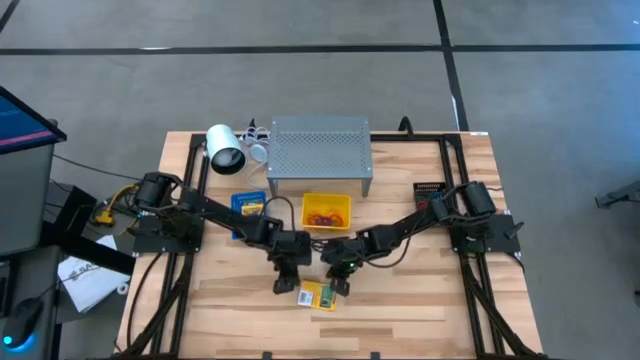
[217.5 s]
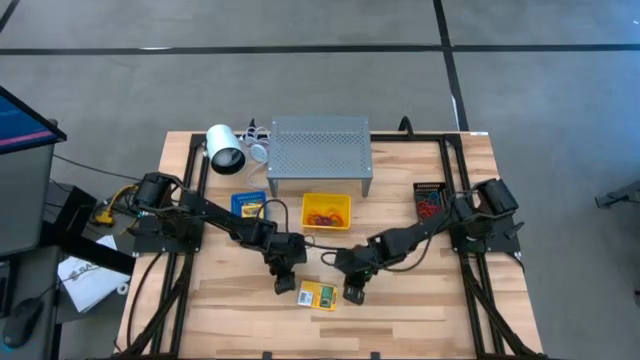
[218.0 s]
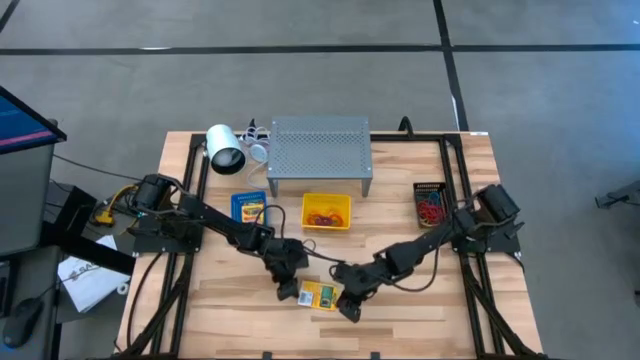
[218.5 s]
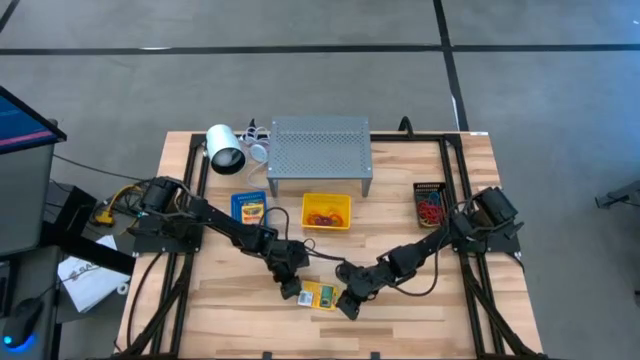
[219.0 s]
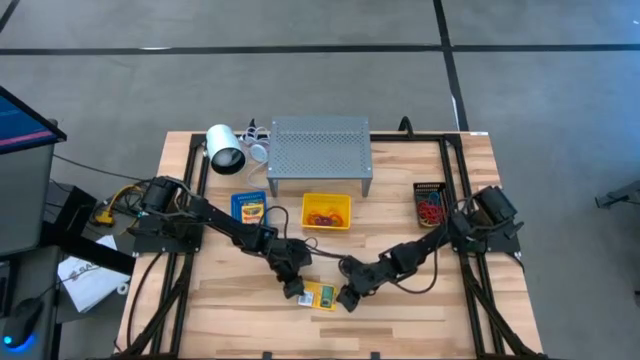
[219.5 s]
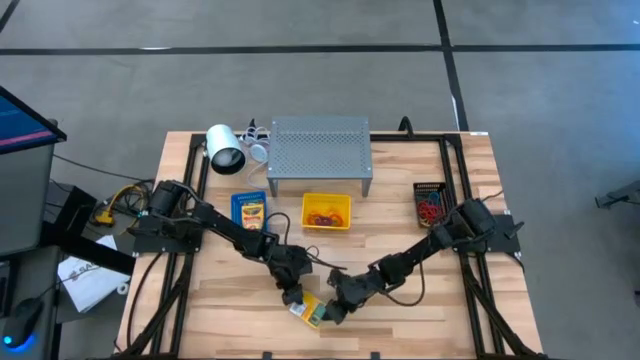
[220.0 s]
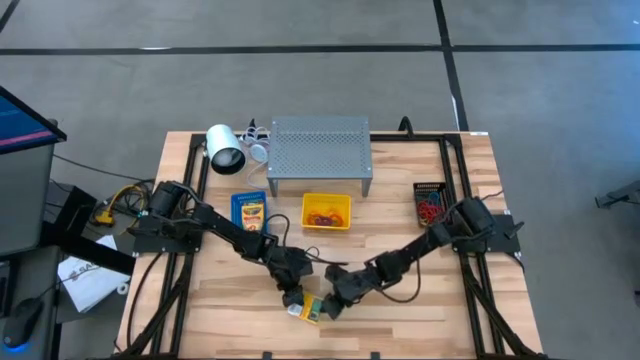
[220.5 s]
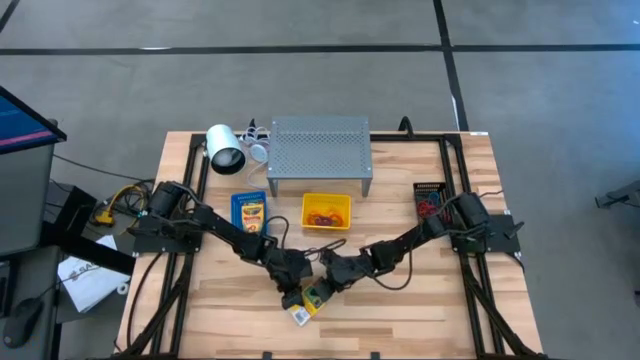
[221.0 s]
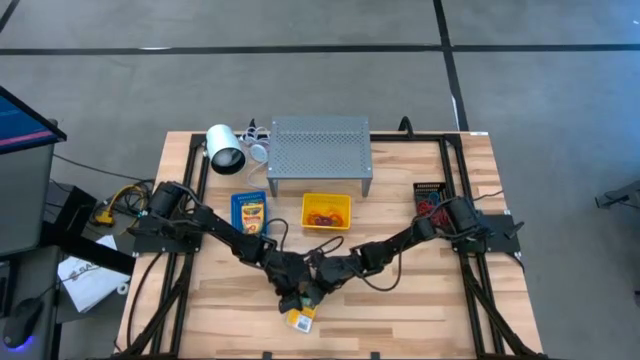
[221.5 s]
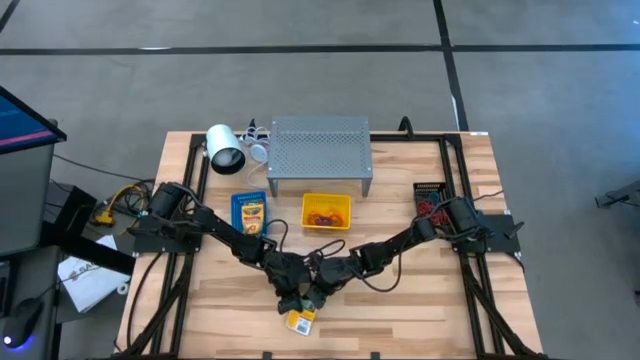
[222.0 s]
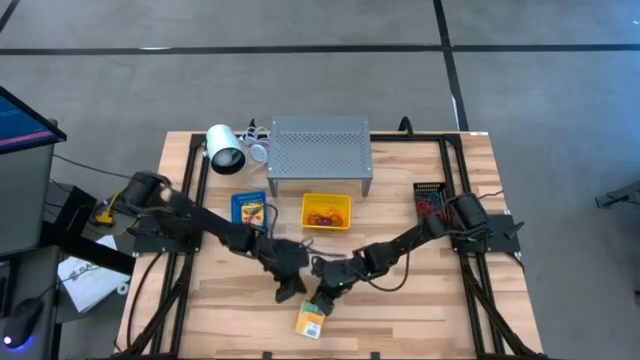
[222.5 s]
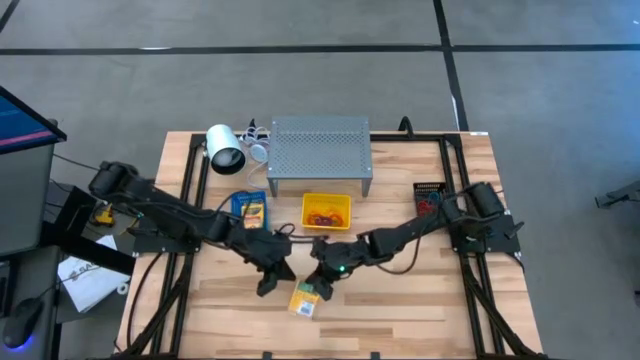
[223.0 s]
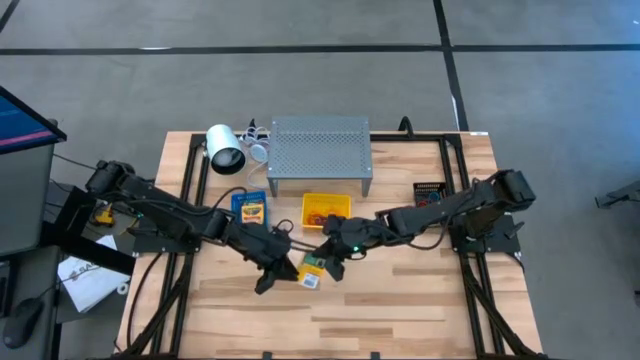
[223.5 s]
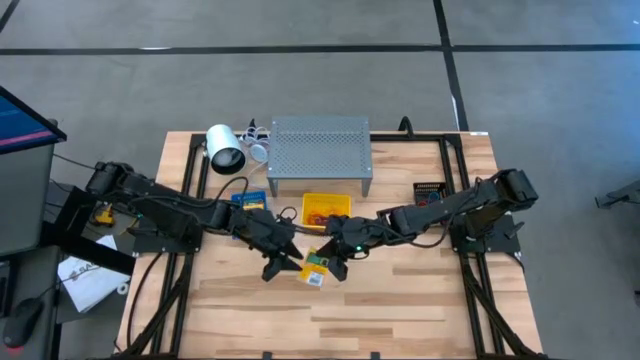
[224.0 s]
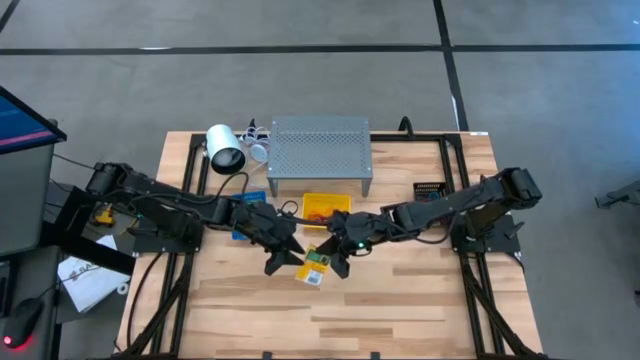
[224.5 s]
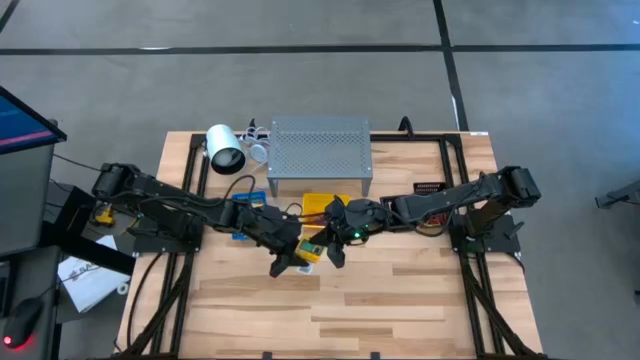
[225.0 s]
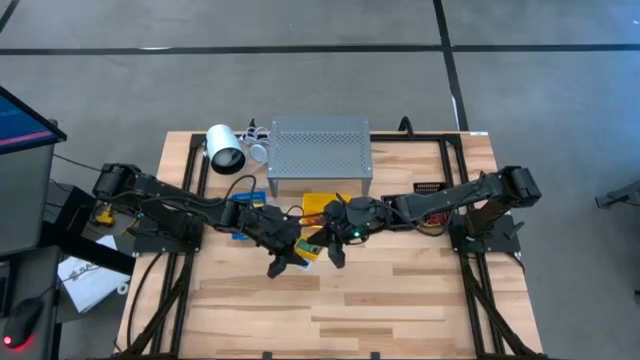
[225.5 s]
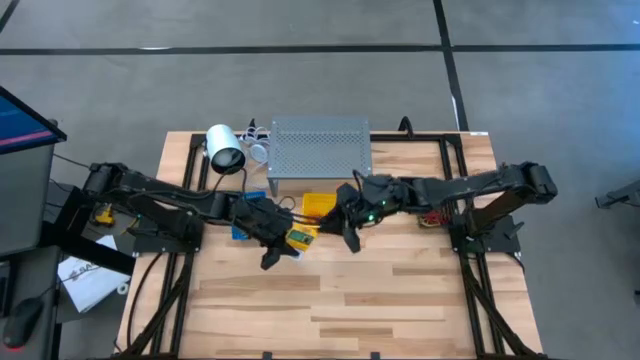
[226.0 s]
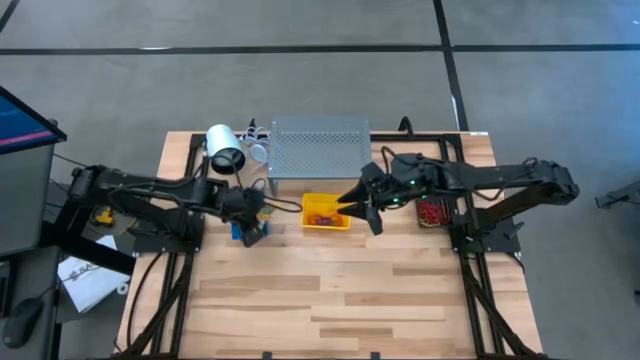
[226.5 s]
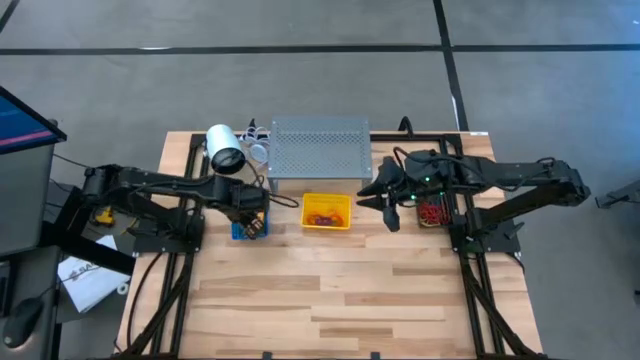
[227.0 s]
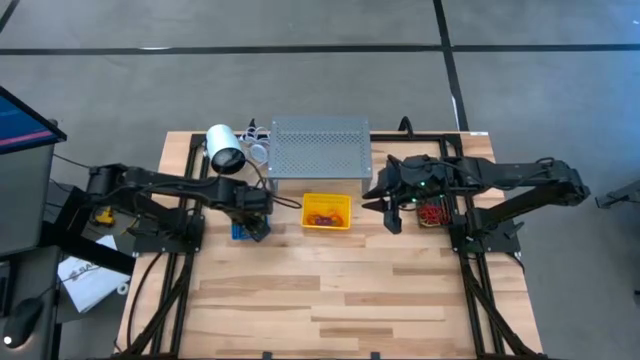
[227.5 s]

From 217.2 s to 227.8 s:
Task: Pick & Place Office Desk Supplies
Put the crayon box into the blue bin

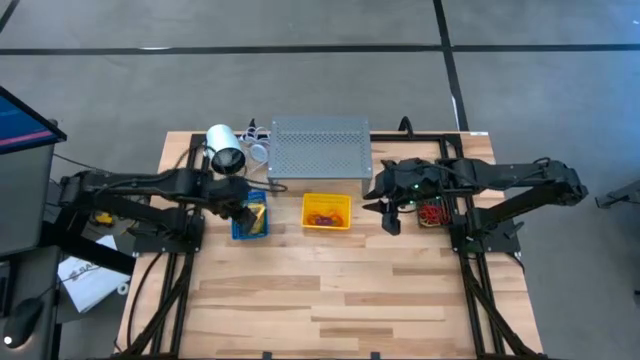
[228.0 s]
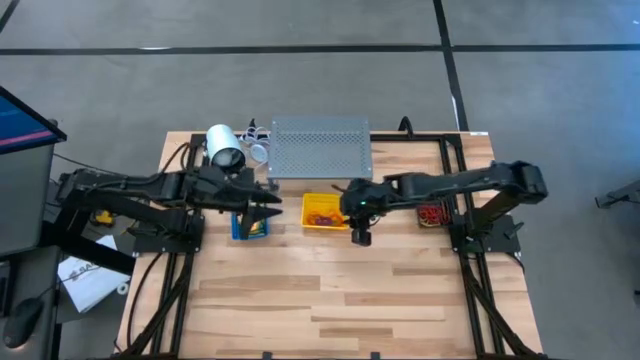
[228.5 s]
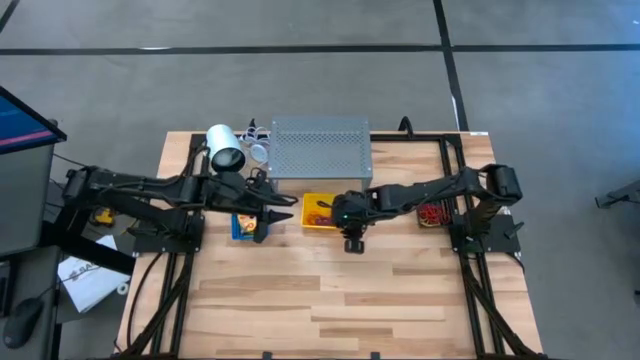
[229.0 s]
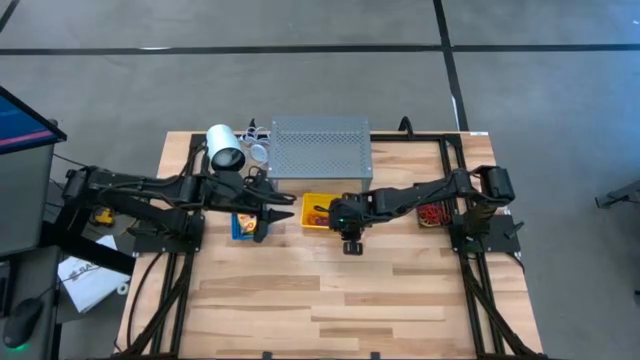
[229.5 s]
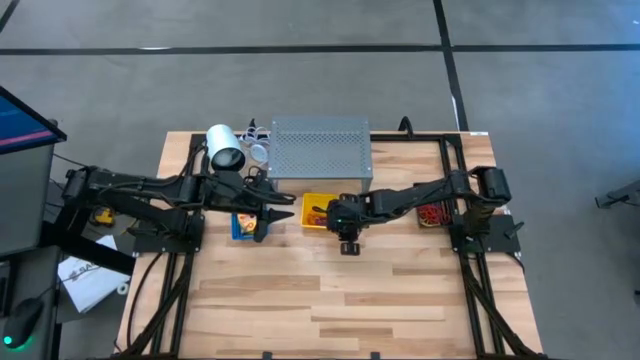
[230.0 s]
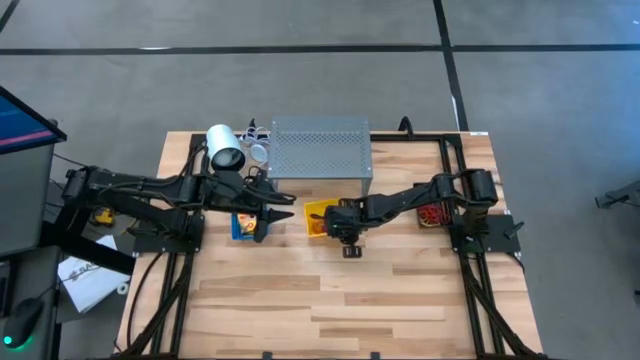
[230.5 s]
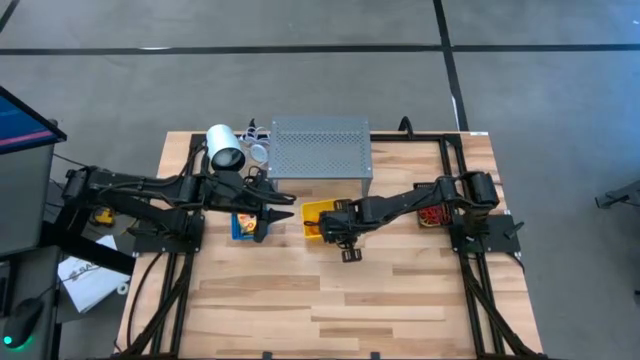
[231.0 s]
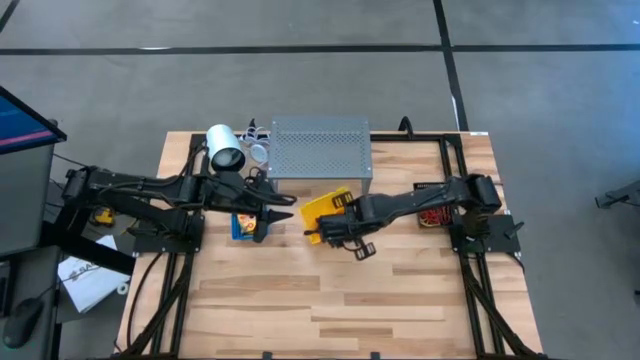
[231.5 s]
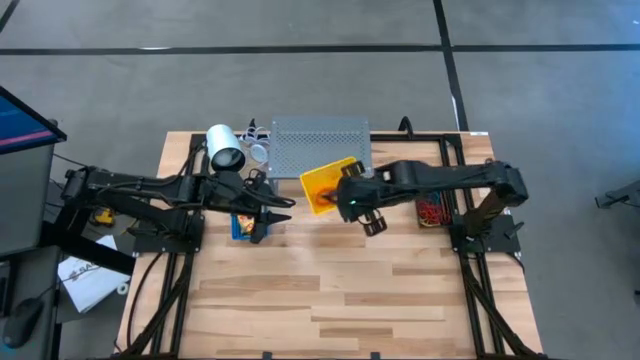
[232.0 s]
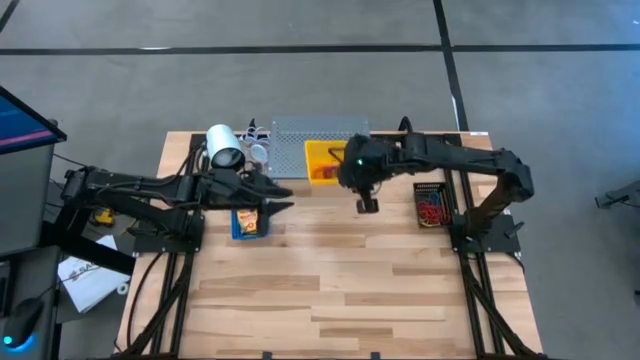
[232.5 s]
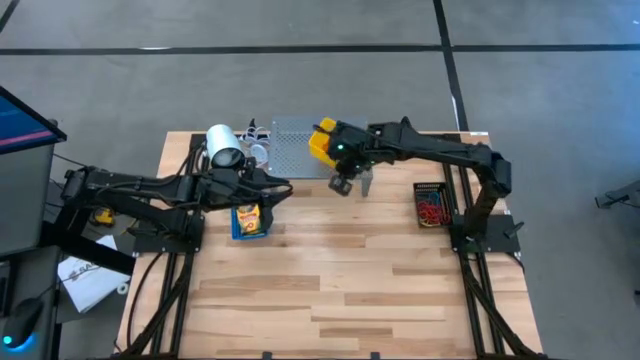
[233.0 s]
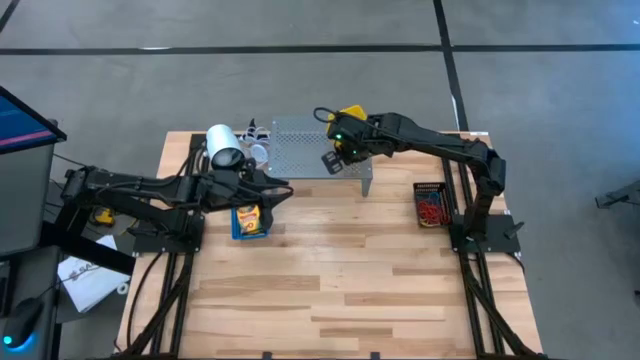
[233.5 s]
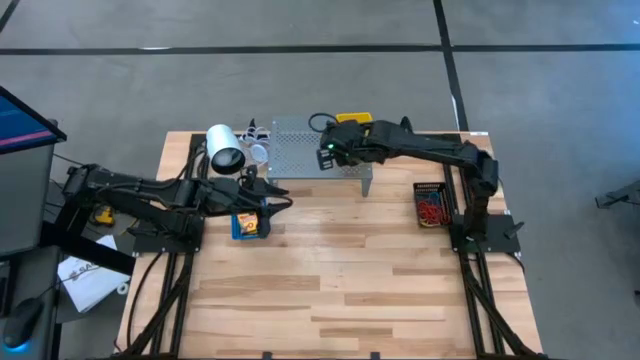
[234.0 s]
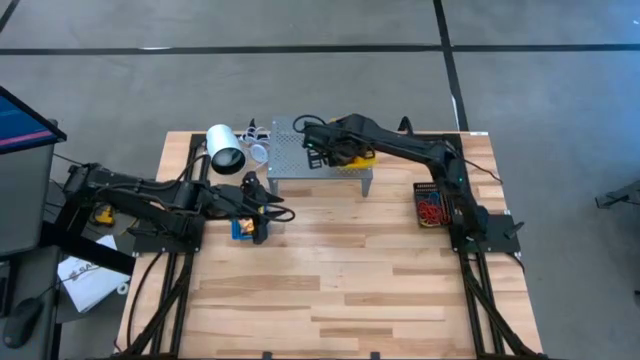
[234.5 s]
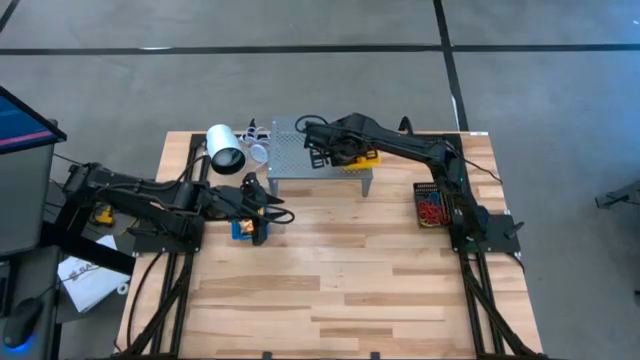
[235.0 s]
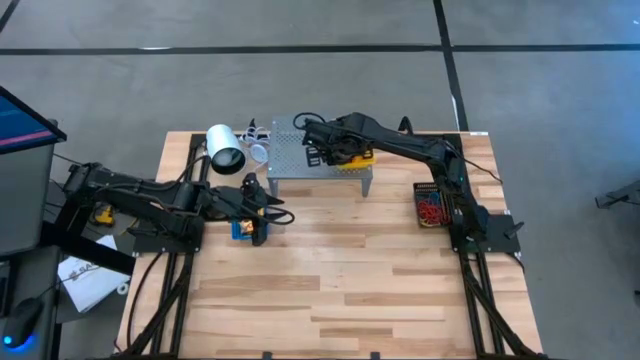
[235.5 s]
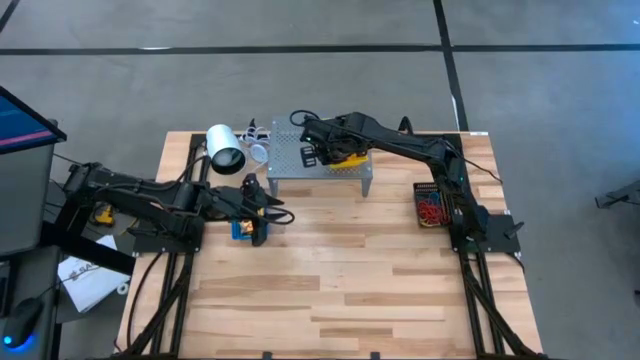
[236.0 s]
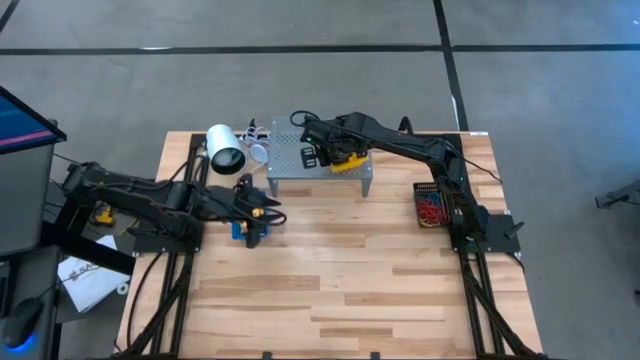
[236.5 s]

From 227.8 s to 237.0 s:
Put the yellow bin with spring keychains on the shelf

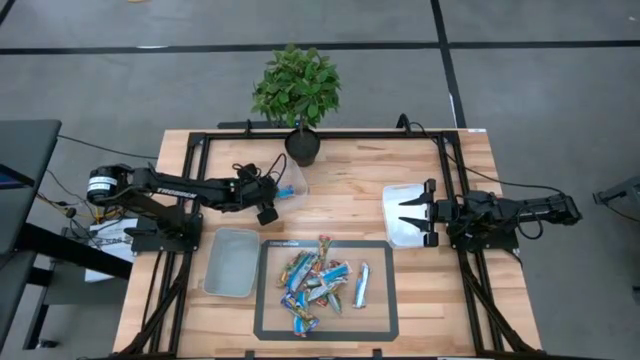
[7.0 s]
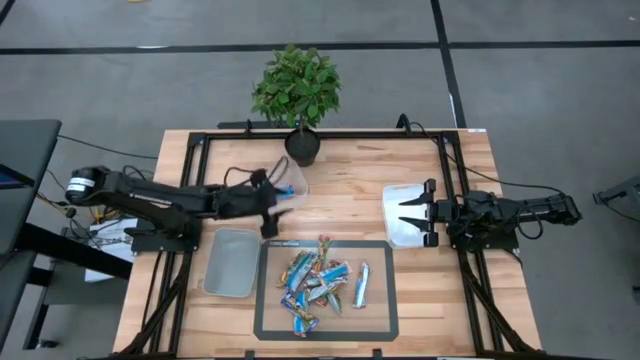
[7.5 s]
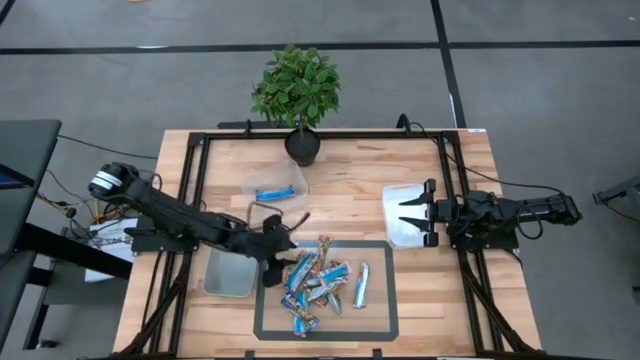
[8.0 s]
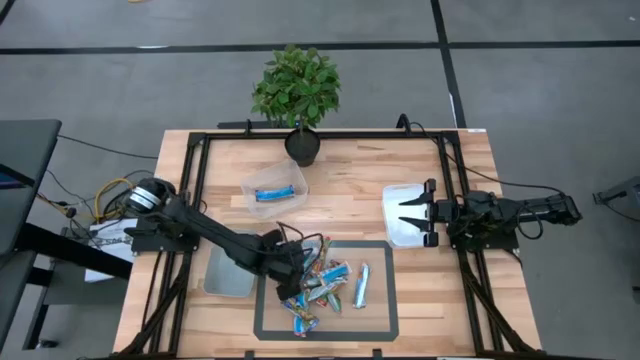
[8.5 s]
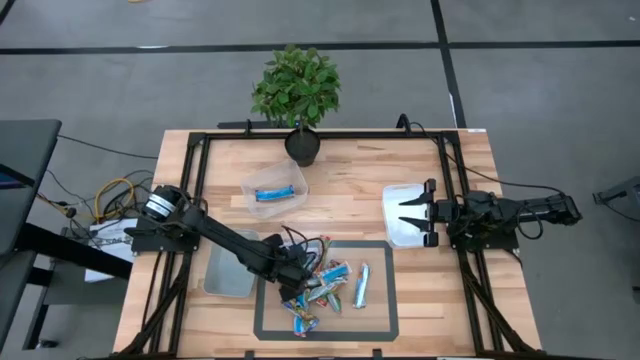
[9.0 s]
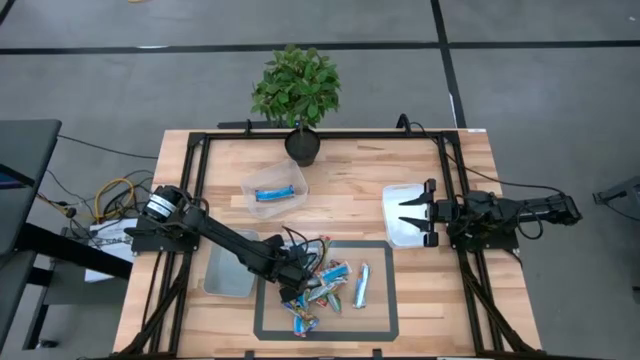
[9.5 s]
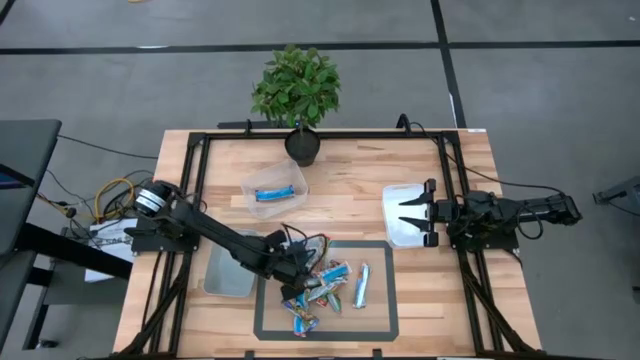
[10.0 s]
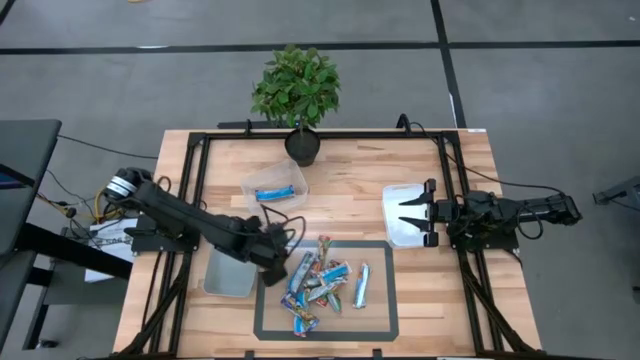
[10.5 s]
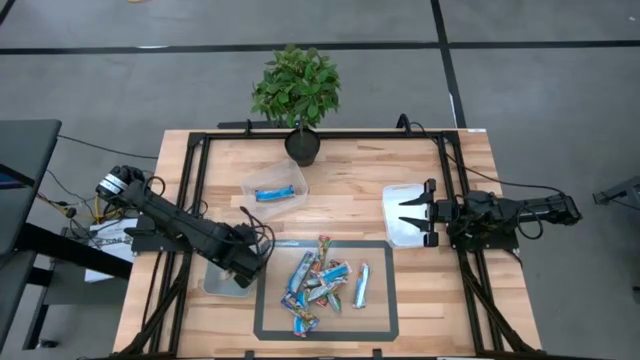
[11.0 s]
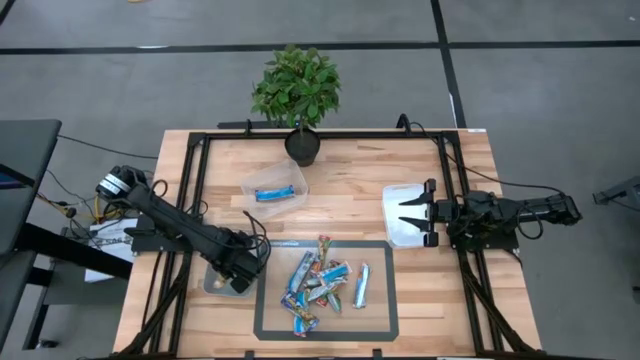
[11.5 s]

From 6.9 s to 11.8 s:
Task: Pick and place Granola Bars by type
Put the yellow granola bar into the gray bin
